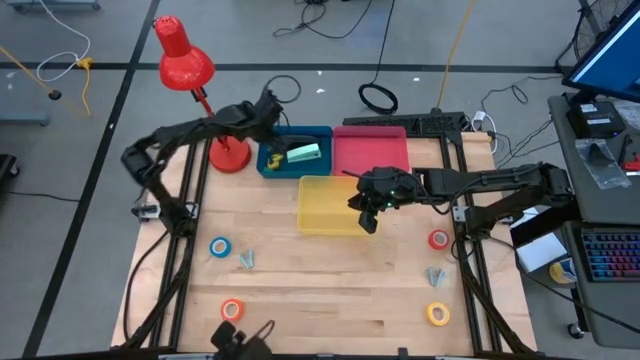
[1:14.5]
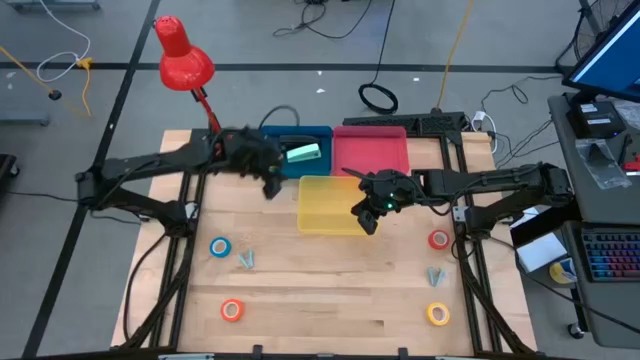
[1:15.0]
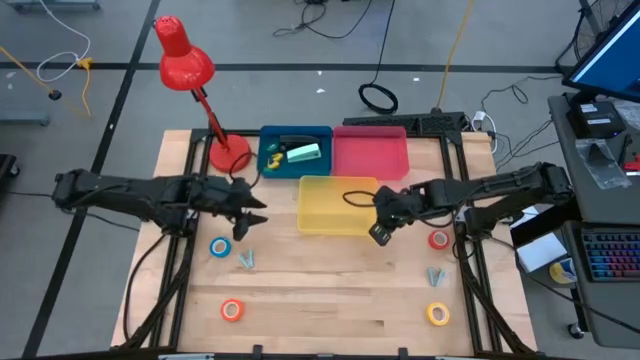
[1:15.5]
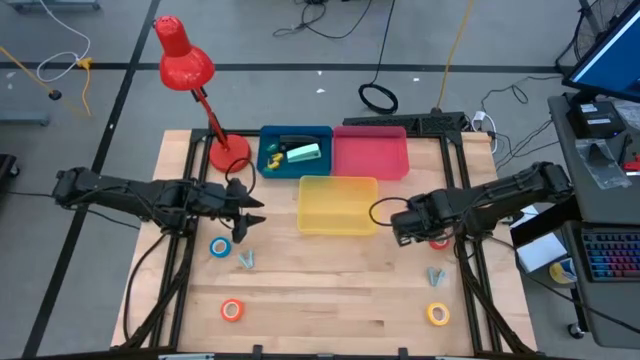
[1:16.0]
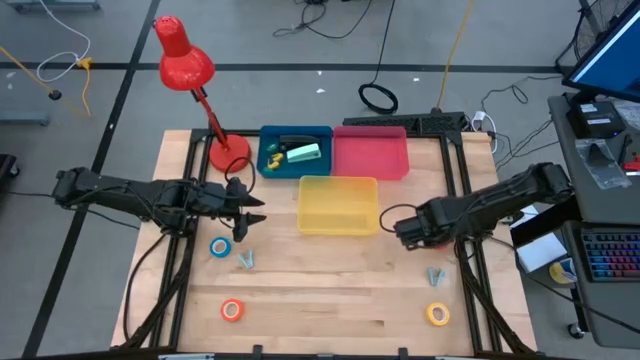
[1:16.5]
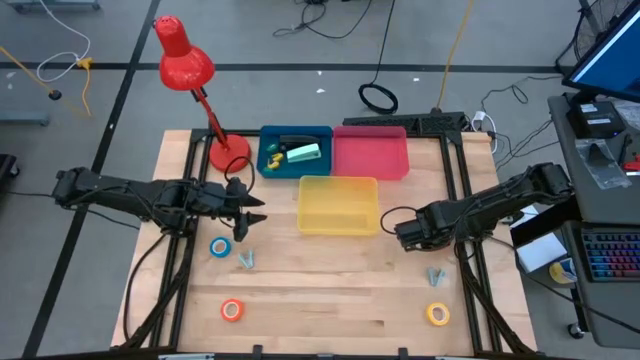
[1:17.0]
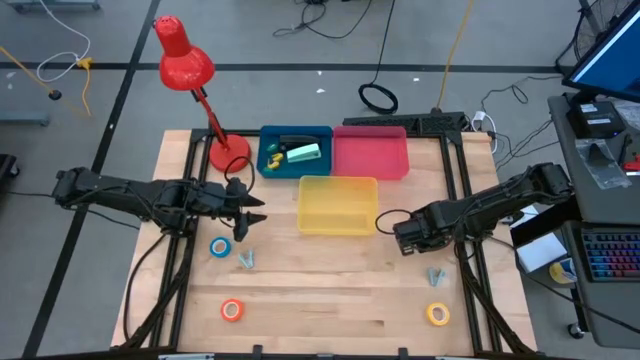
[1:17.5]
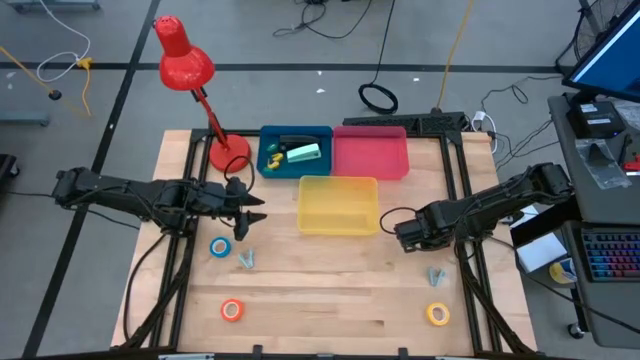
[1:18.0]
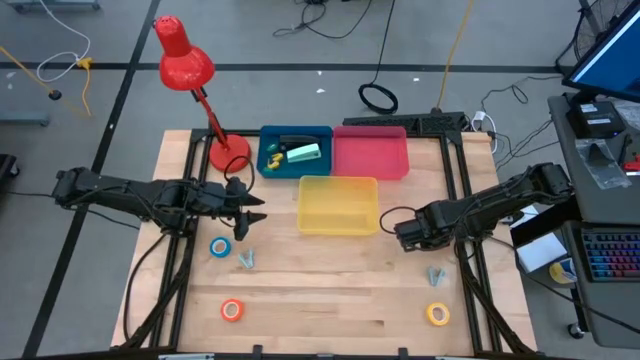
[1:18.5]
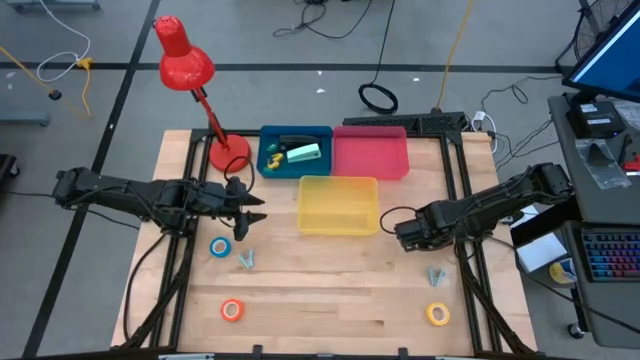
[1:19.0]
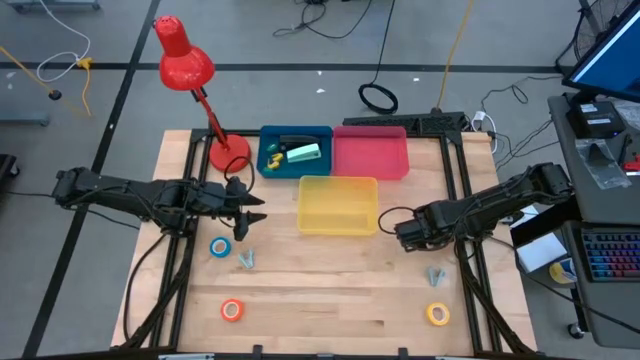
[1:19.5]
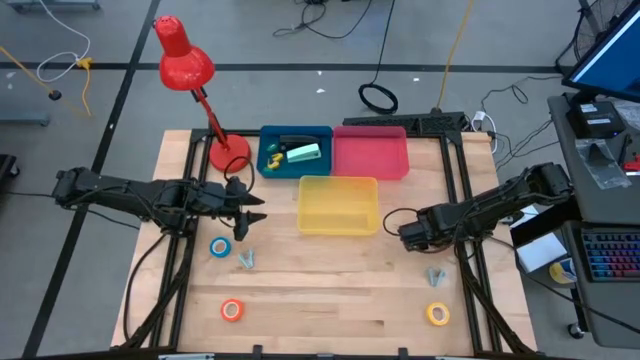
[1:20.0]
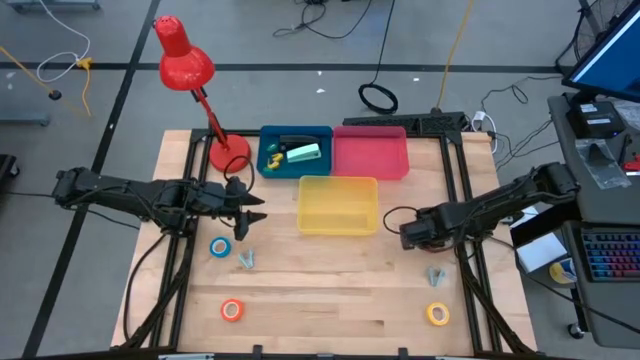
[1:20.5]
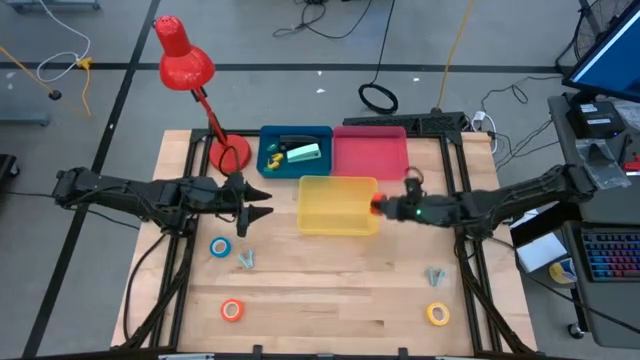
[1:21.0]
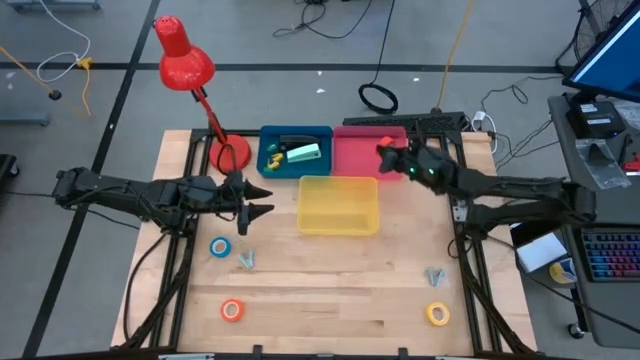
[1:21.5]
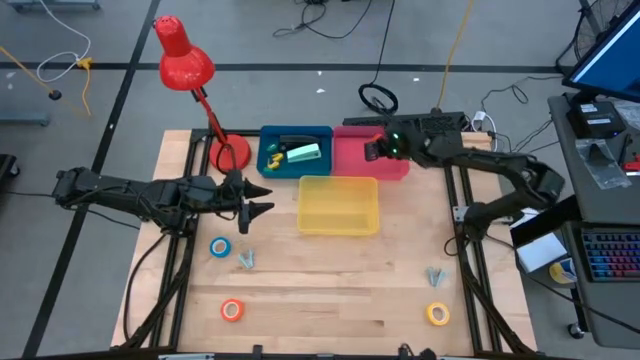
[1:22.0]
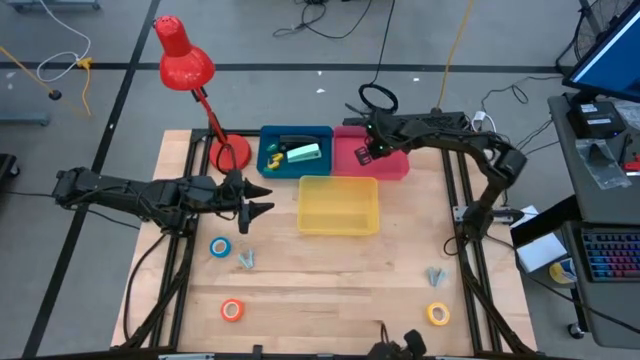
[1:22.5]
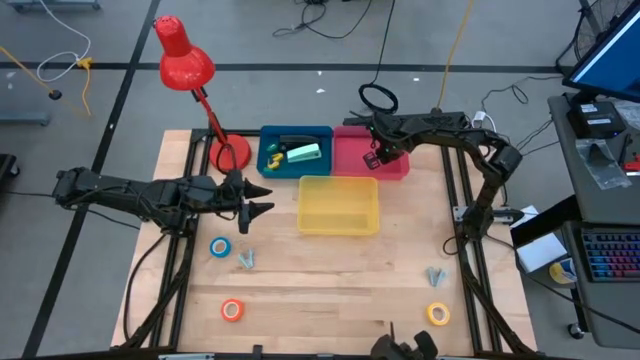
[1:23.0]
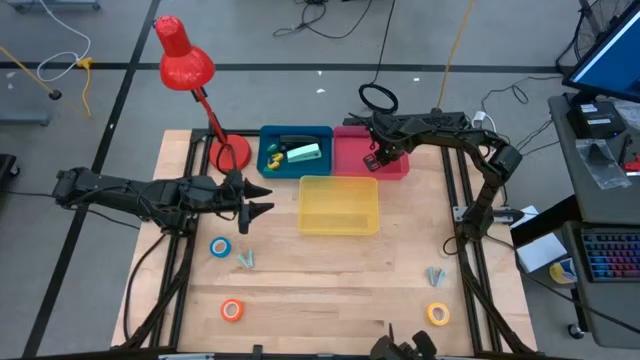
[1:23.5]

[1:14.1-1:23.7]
Task: Pick and place Stapler, Stapler remover, tape
Put the red tape into the pink bin

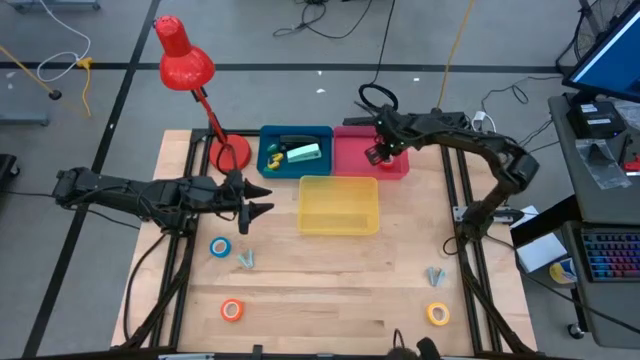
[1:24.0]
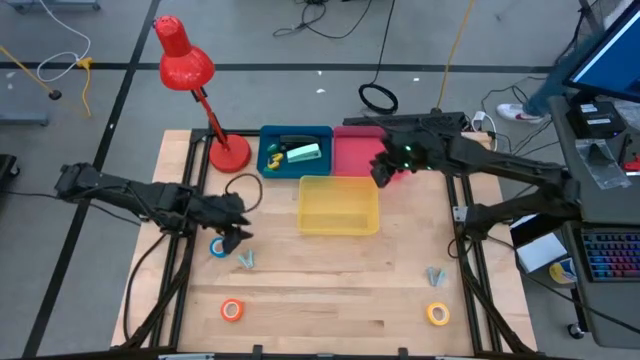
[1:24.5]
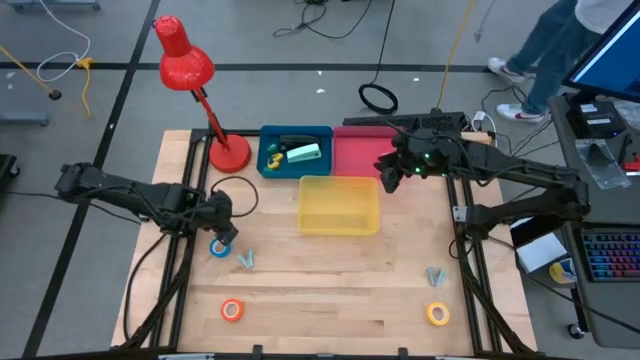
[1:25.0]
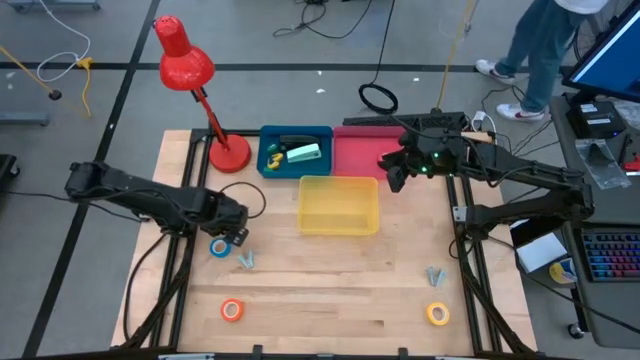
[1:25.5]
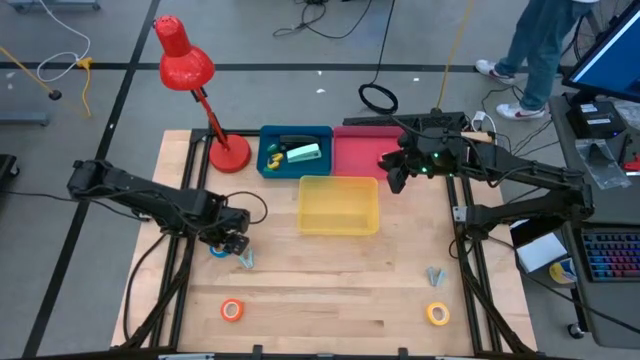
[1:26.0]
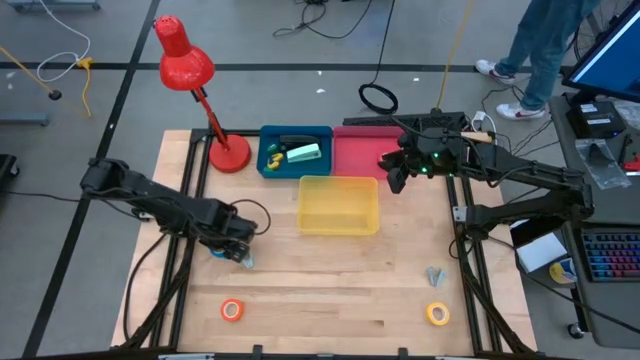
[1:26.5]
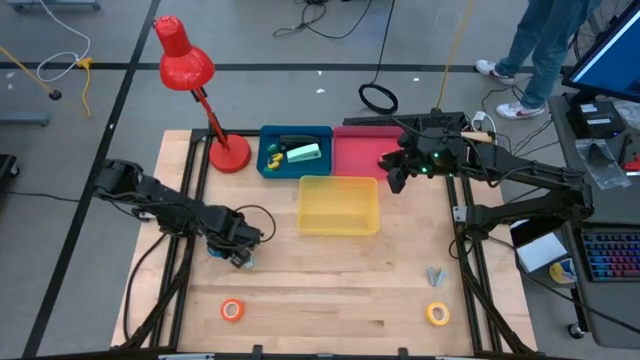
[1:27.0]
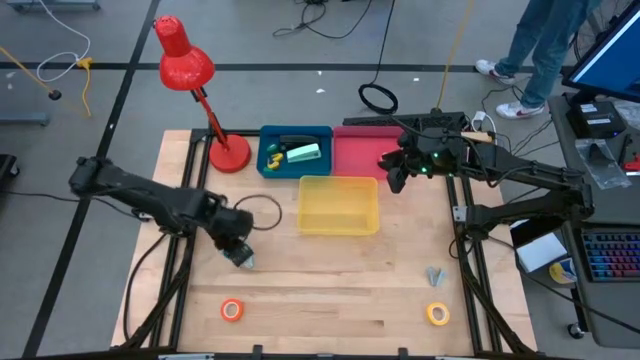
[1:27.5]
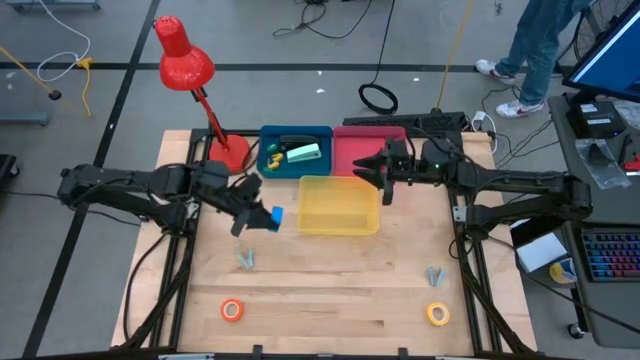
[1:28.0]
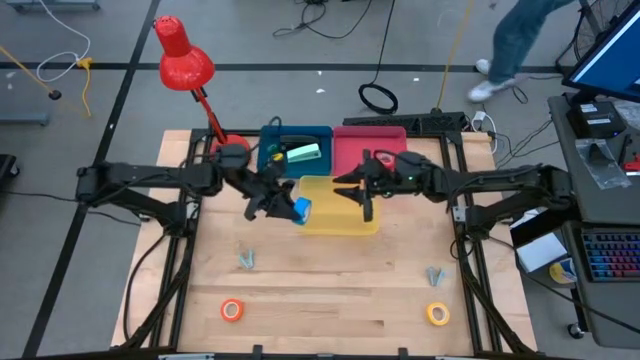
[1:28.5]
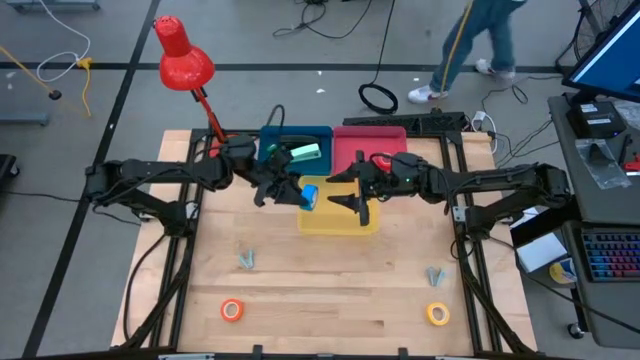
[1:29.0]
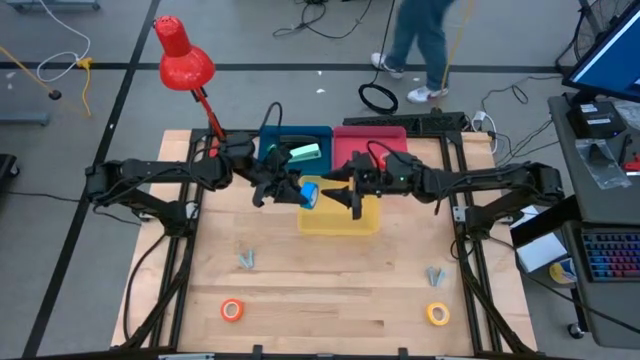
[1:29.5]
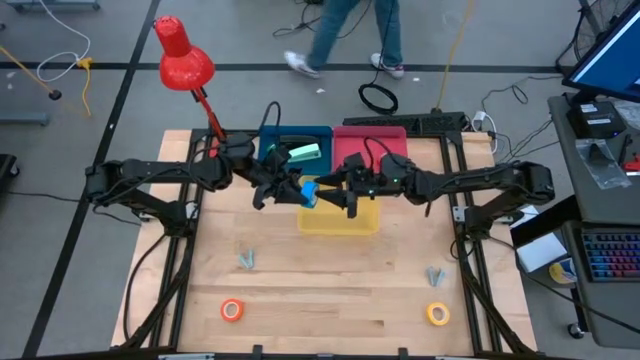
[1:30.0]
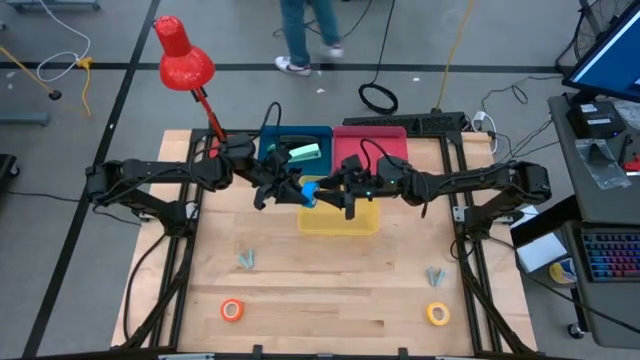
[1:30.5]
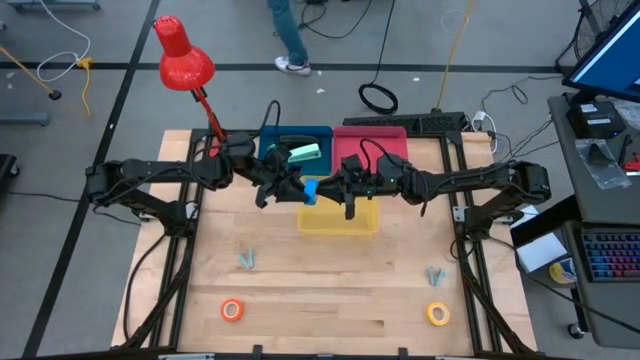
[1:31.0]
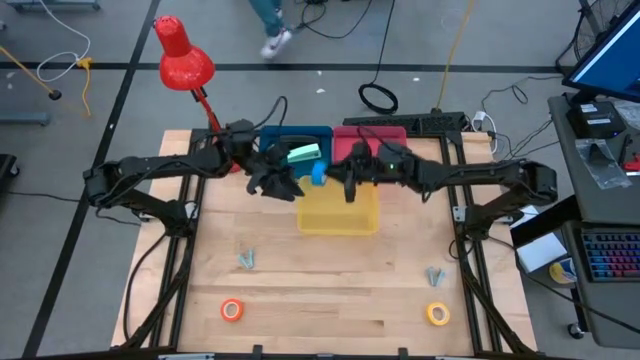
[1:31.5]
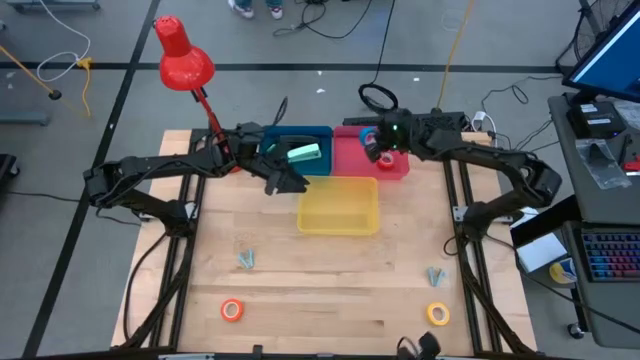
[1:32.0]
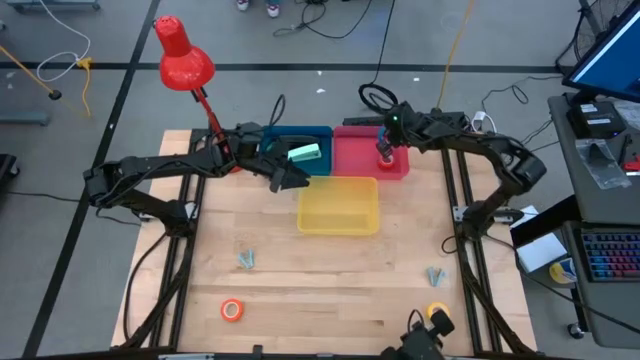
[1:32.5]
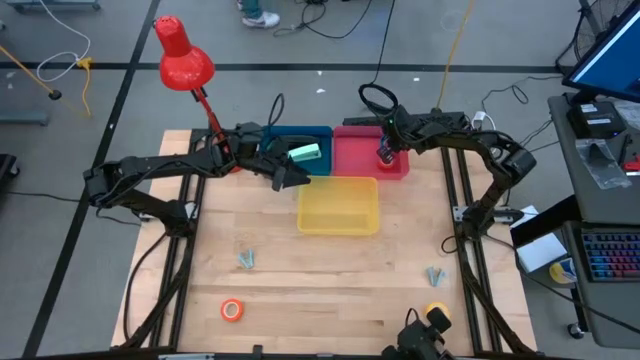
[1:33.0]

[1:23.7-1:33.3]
Put the blue tape into the pink bin

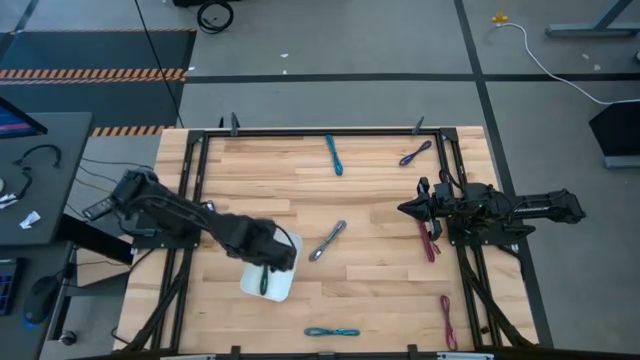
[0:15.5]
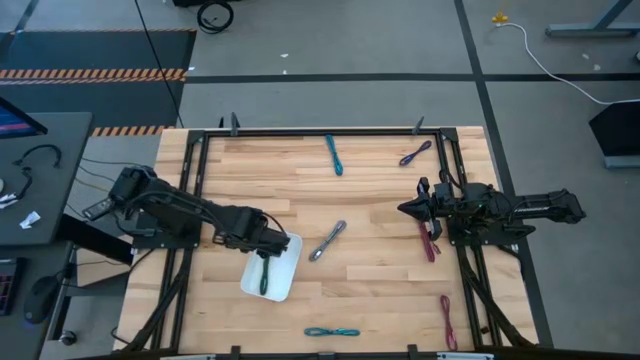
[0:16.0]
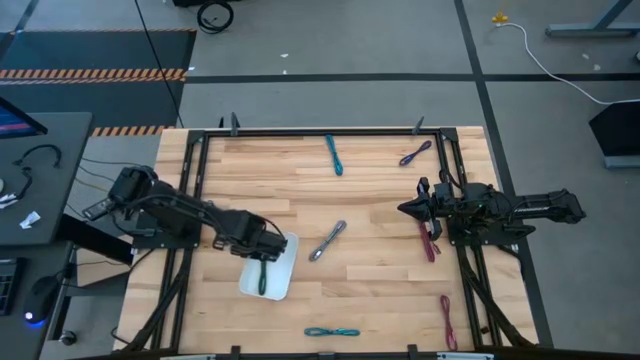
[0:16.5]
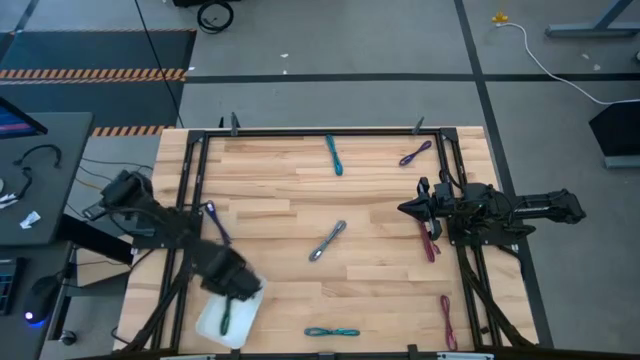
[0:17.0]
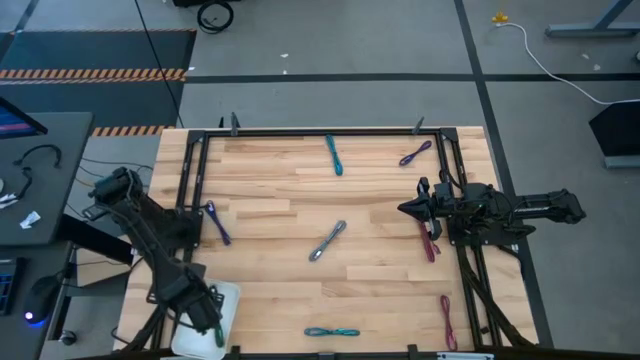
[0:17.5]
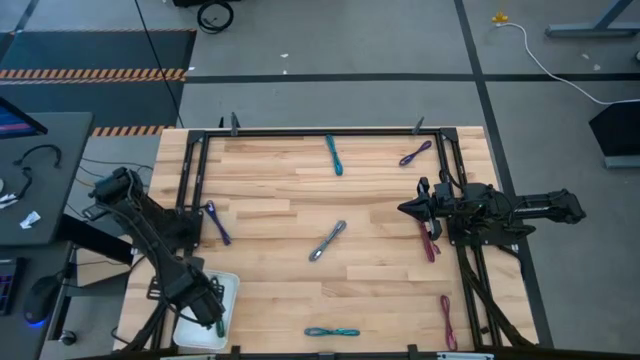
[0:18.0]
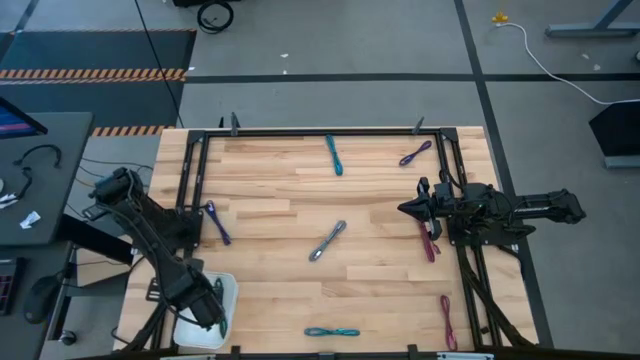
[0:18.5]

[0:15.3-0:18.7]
Task: Pick and place USB-C Cables
Move the white bin to the bottom left of the table
